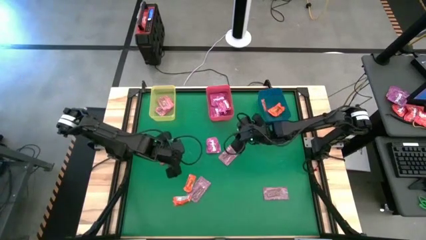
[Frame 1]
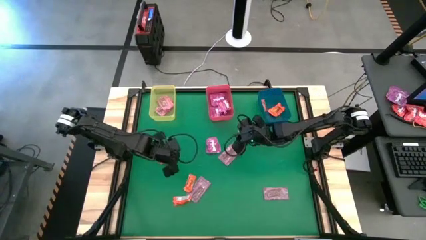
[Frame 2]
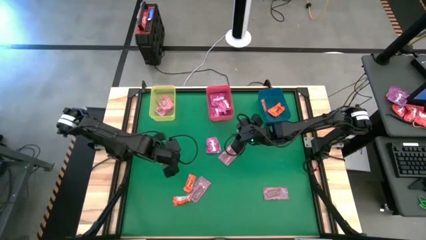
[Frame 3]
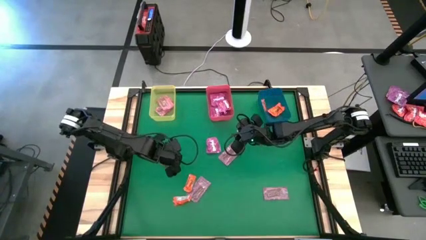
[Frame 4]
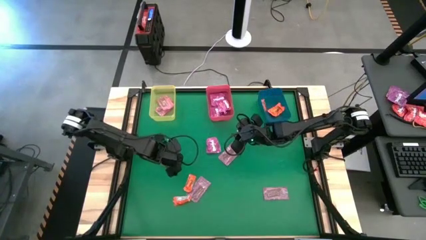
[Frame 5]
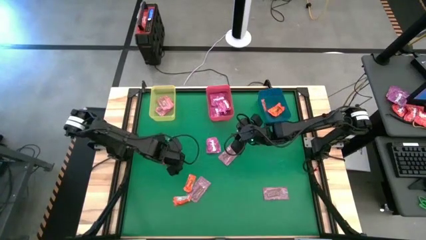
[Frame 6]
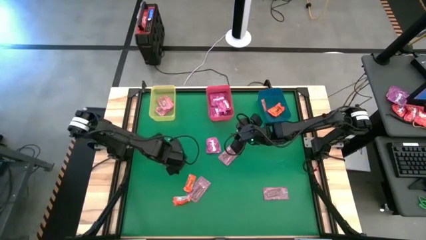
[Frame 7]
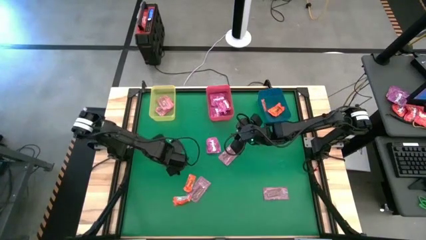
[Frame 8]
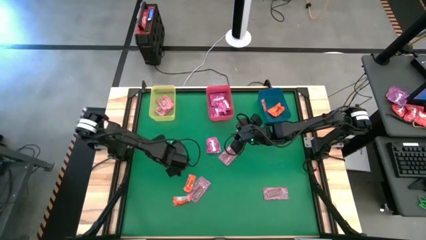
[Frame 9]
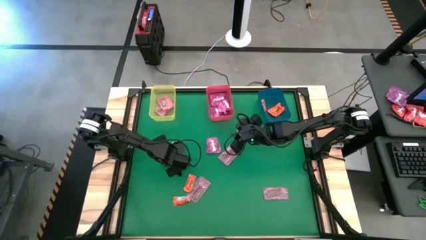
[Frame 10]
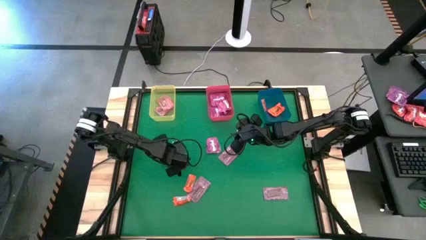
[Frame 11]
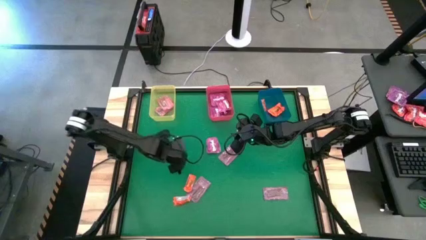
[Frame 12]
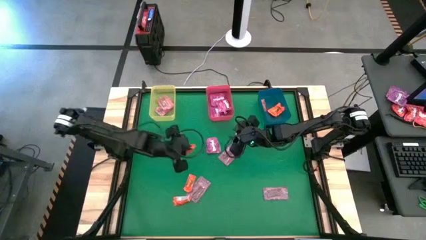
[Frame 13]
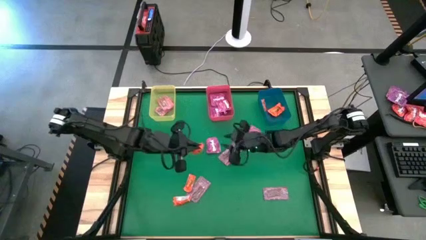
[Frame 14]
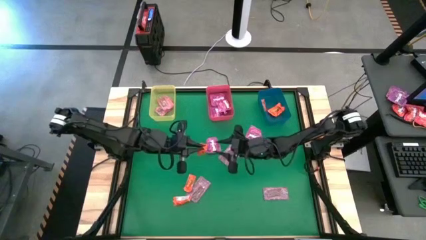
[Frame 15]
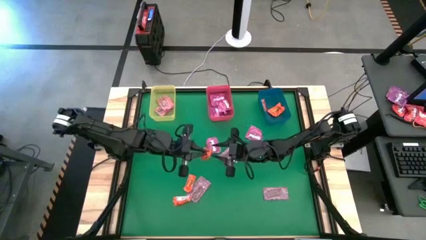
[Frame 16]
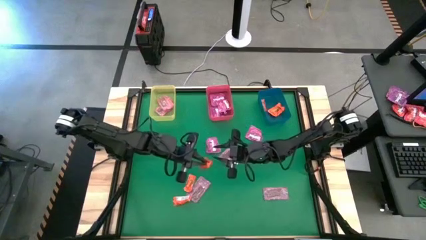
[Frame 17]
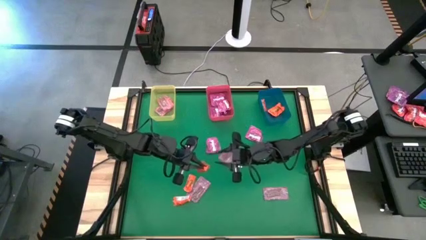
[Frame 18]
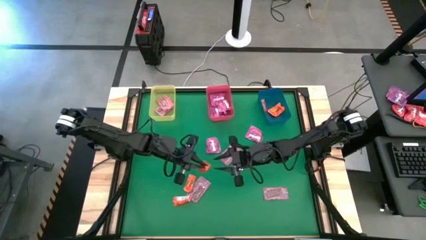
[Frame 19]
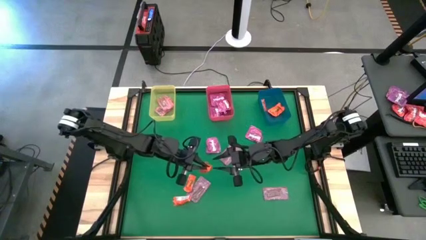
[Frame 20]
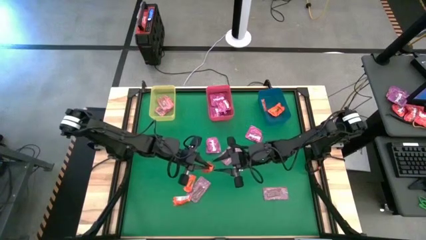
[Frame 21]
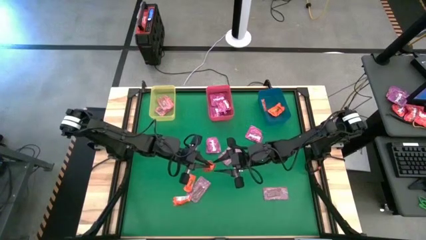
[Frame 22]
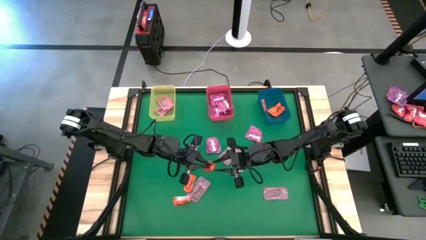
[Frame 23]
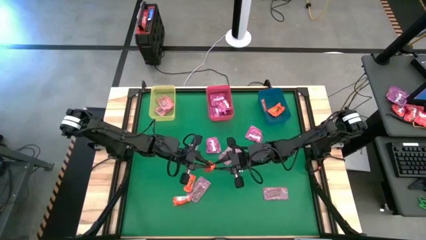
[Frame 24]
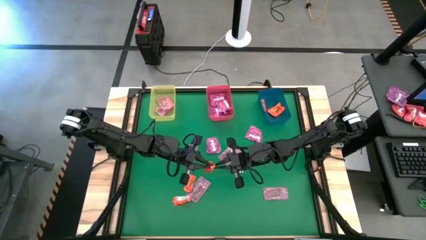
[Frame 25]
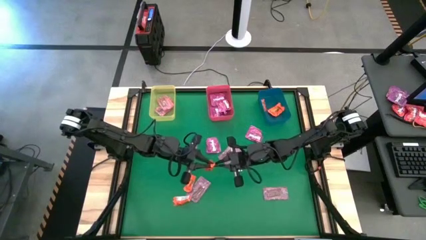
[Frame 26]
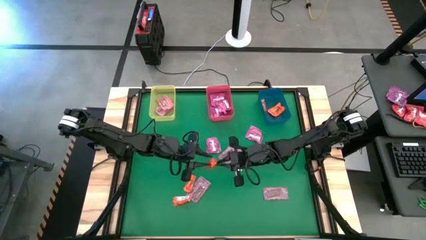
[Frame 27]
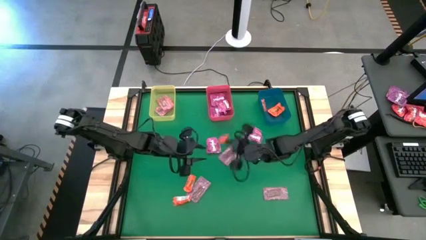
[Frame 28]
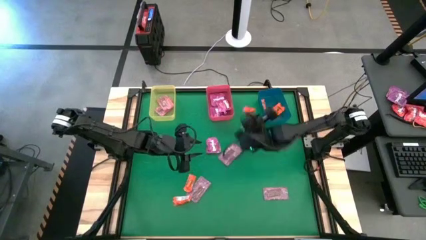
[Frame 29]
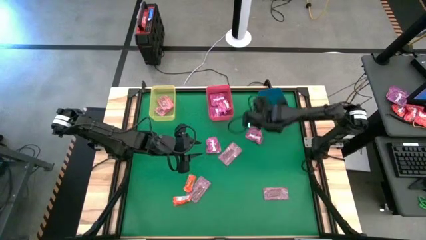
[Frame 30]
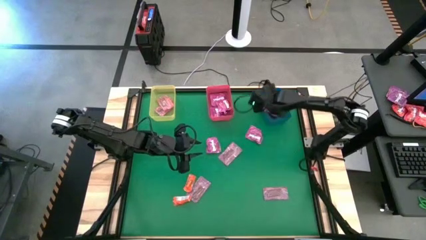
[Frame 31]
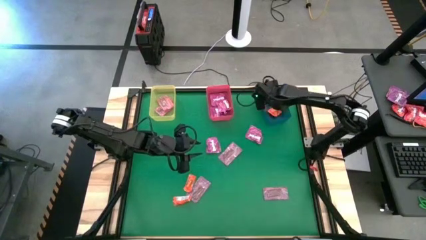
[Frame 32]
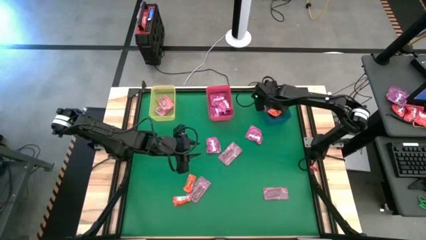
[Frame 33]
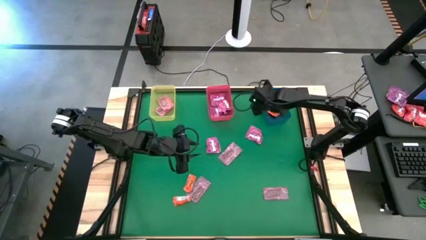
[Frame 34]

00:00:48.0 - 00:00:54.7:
Task: Sort candy by brand, put in halloween buckets
Put the orange candy into the blue bin

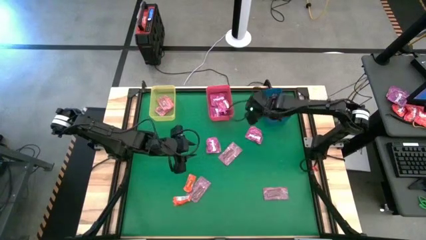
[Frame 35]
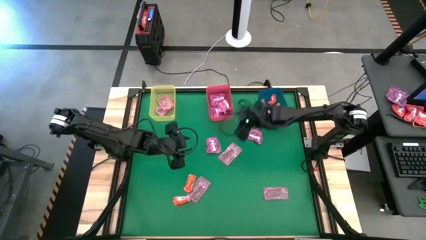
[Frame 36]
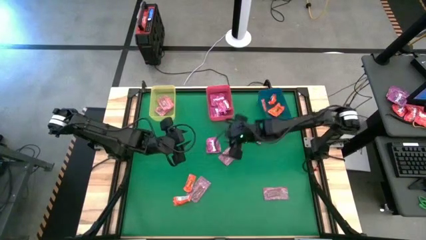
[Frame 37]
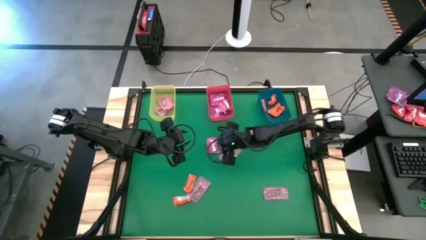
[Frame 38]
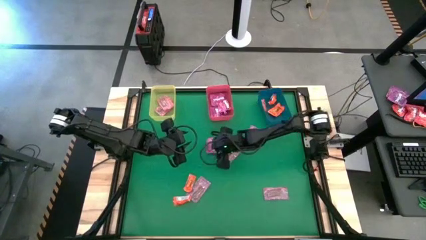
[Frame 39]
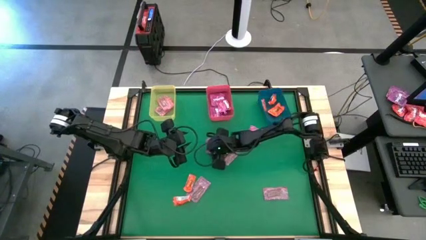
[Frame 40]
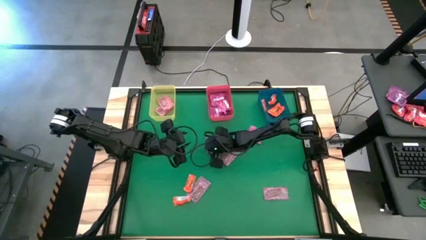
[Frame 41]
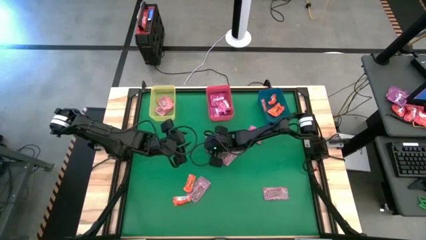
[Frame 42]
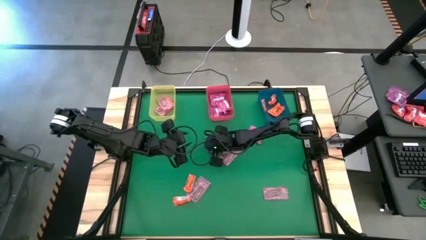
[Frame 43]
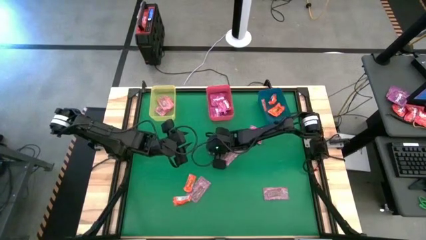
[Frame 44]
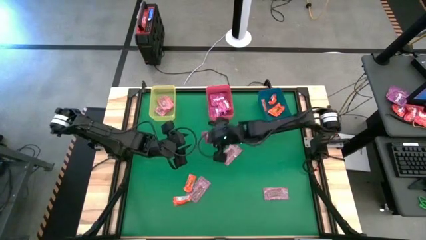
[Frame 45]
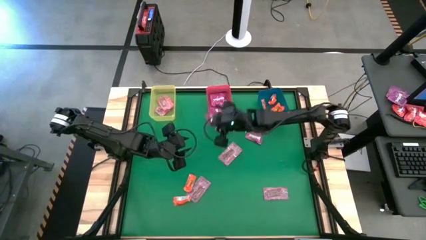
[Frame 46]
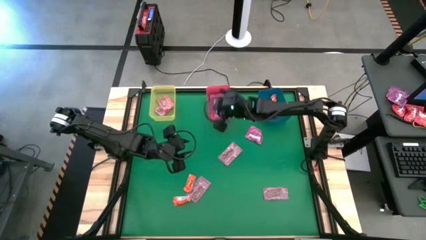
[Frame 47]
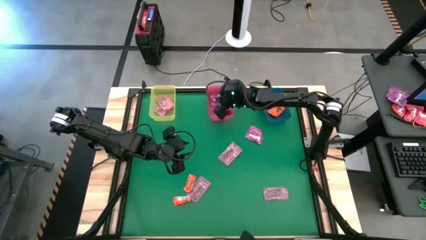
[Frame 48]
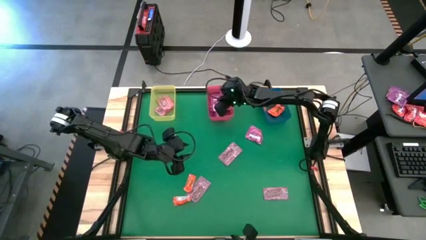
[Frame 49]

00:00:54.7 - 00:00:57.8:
Put the violet candy into the pink bin

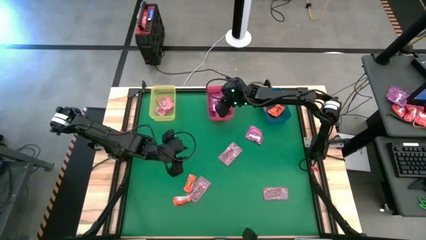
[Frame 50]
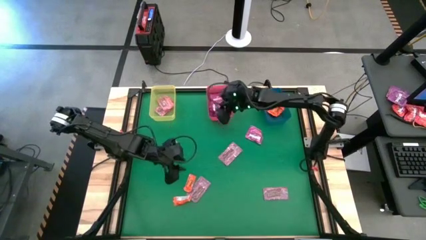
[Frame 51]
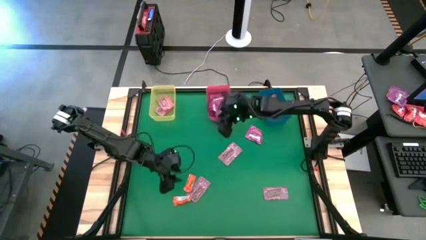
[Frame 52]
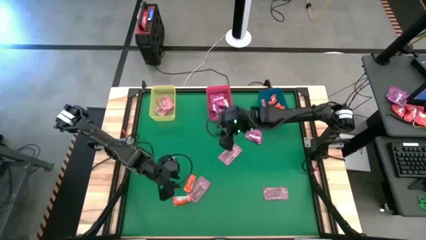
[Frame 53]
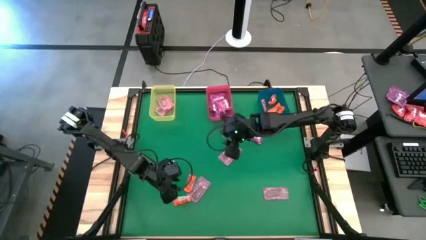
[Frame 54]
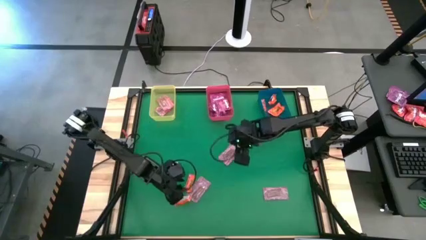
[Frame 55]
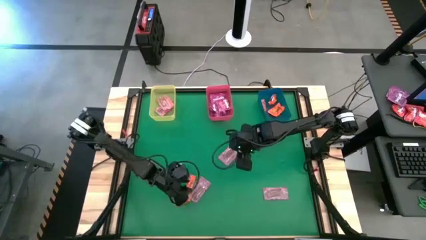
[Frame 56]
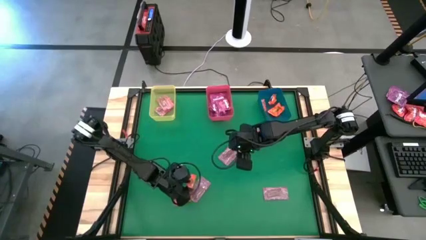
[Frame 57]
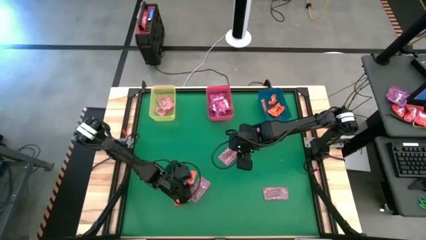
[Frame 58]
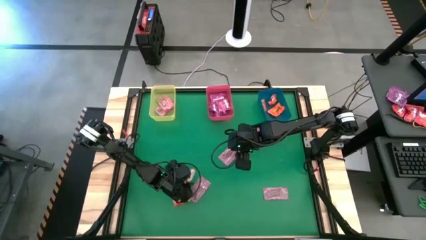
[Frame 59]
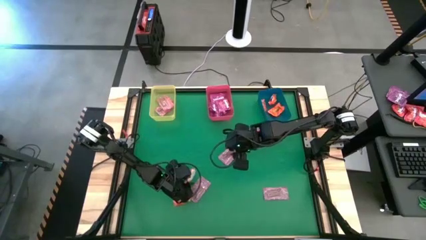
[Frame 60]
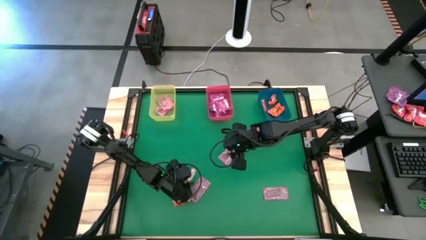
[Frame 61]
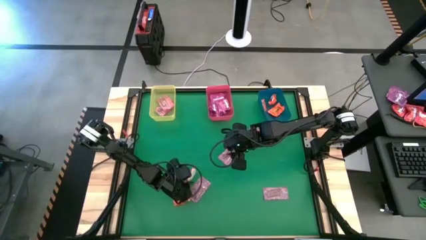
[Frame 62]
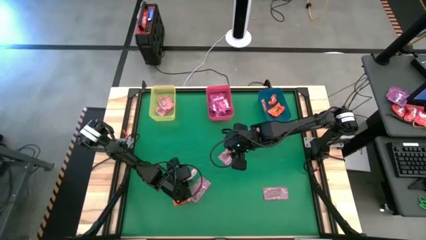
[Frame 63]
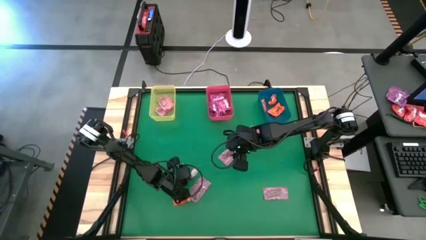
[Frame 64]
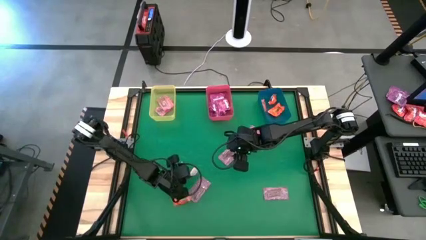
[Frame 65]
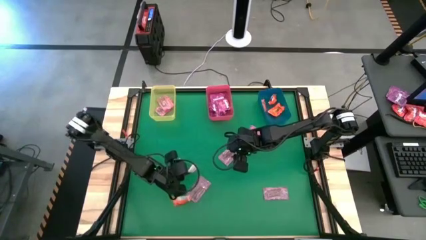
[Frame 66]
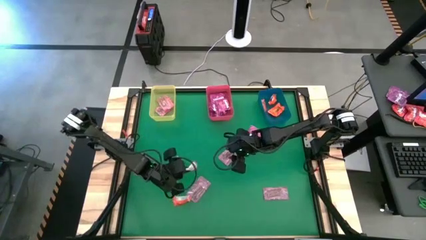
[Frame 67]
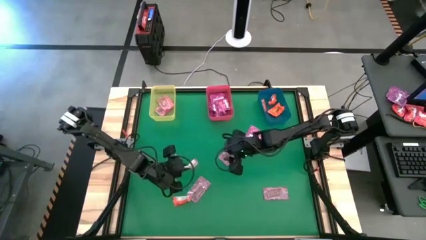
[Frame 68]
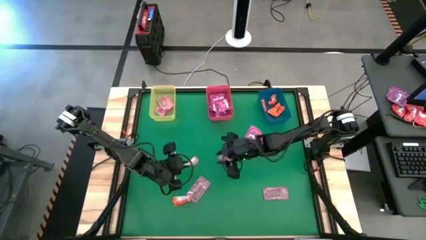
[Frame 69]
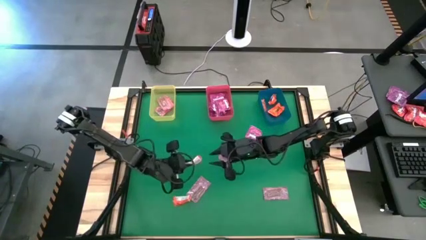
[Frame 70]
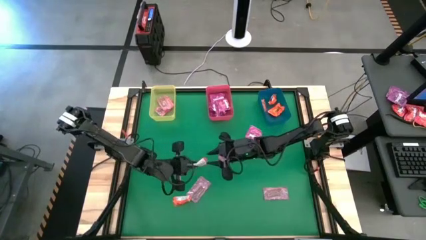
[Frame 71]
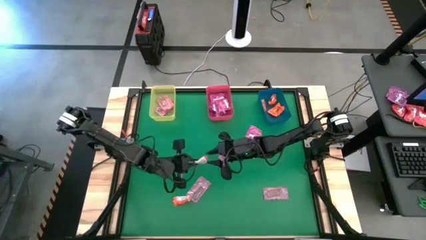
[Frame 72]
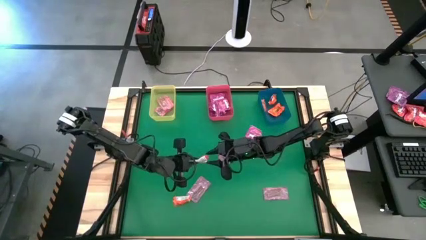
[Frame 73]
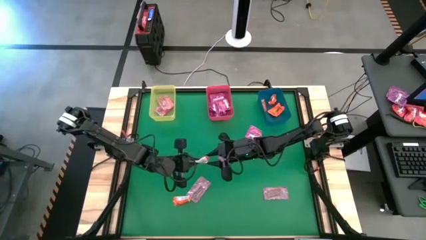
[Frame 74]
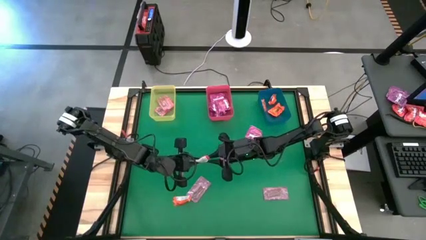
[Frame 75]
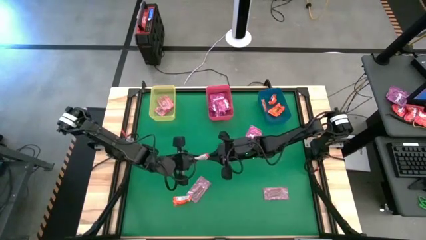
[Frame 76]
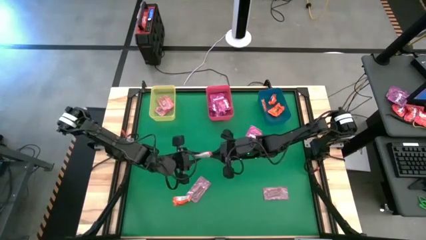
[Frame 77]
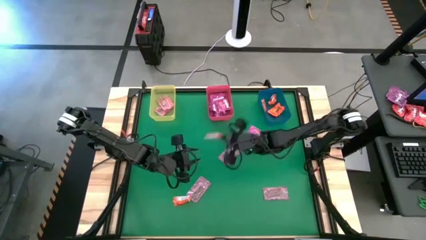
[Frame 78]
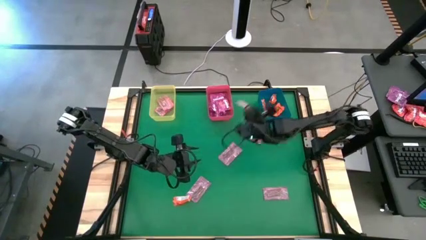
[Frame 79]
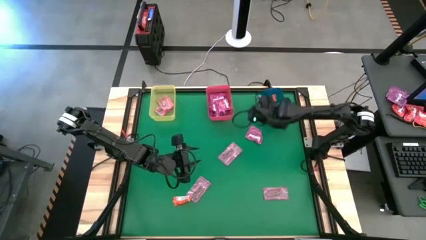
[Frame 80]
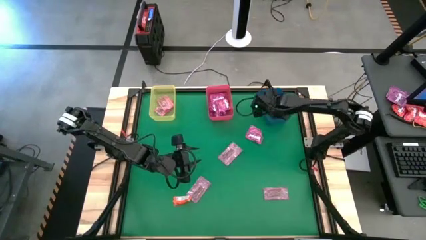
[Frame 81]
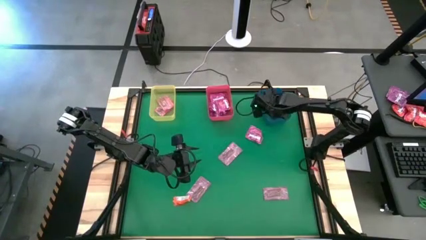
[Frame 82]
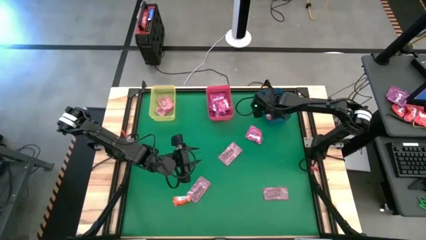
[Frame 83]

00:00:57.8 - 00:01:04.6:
Put the orange candy into the blue bin
